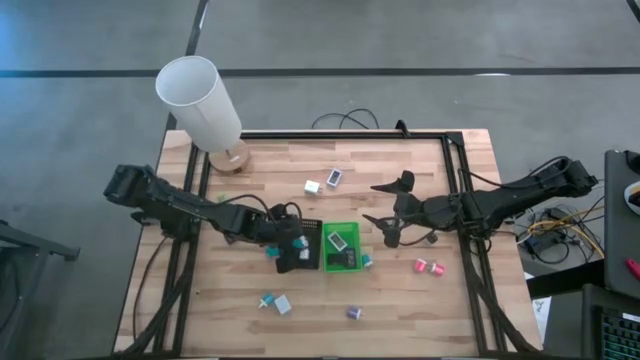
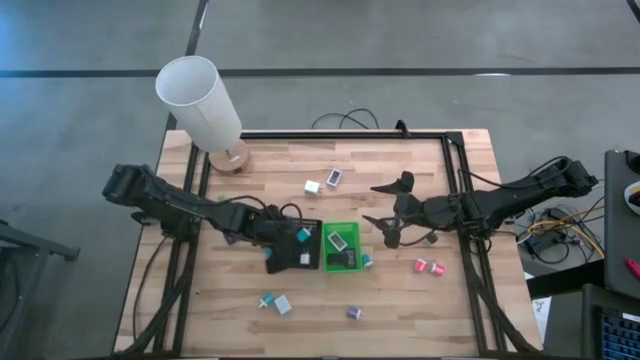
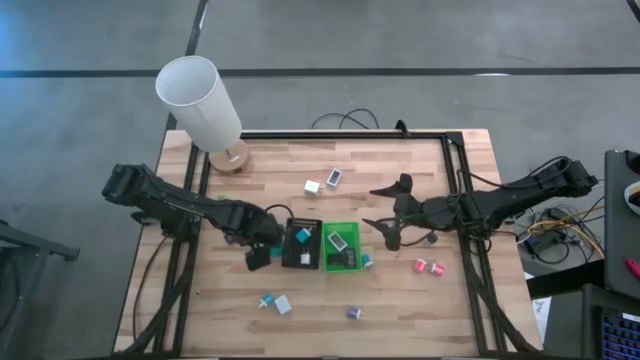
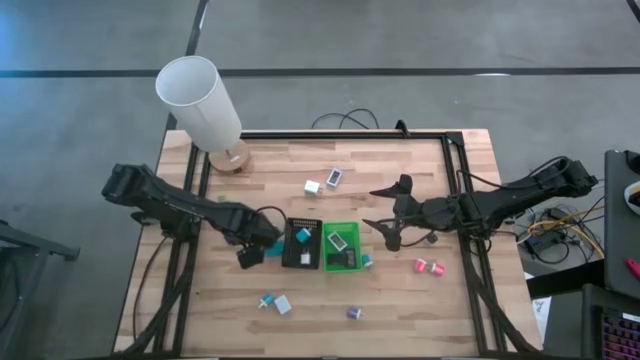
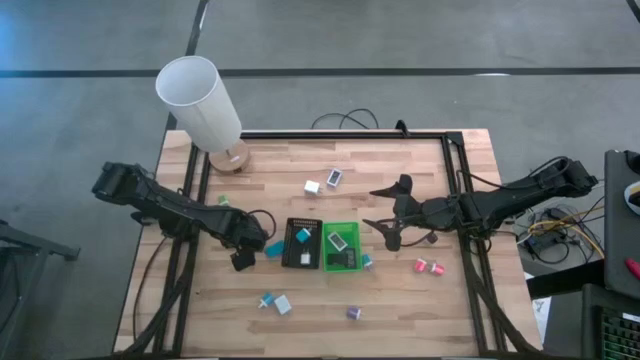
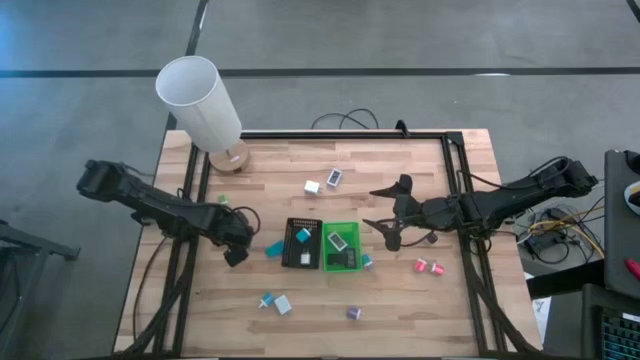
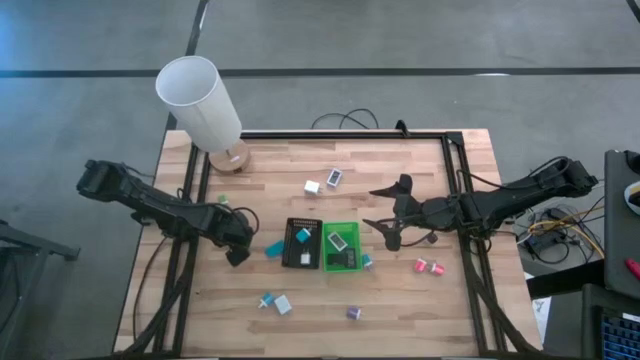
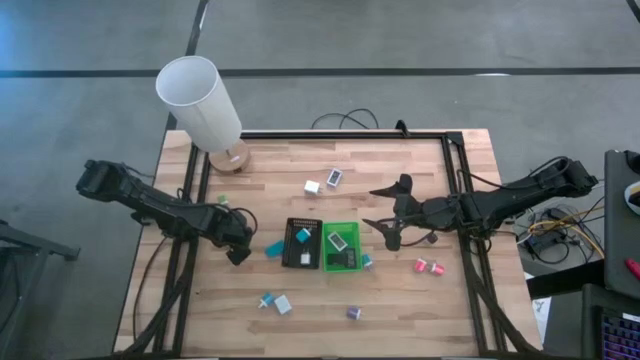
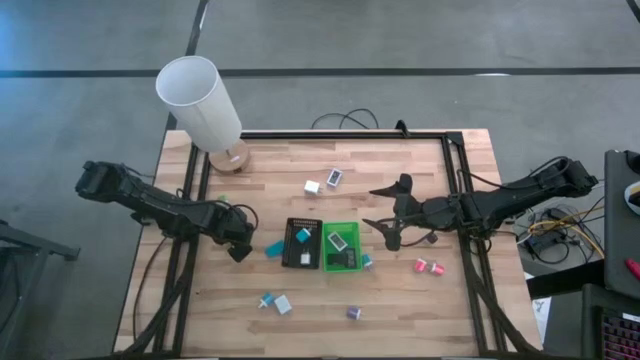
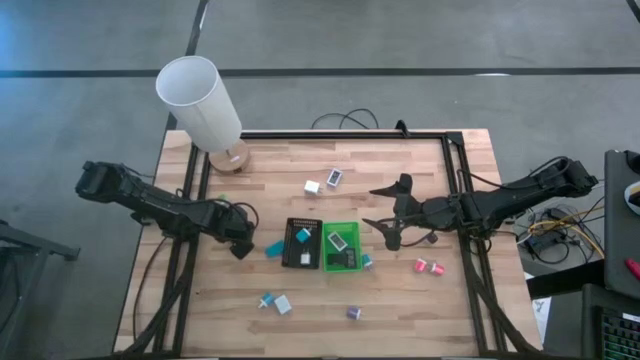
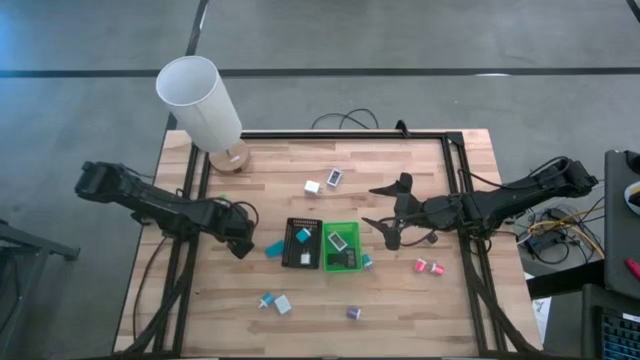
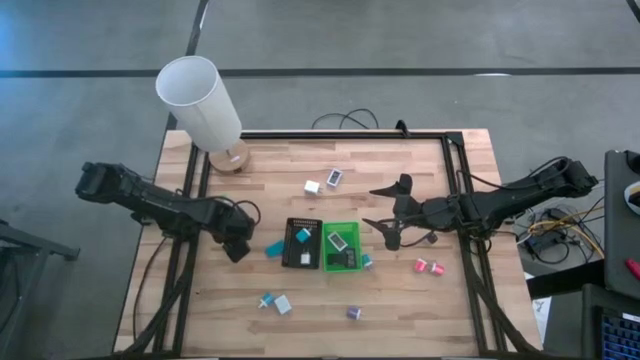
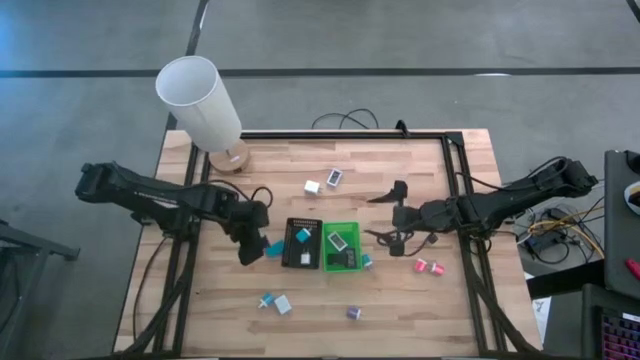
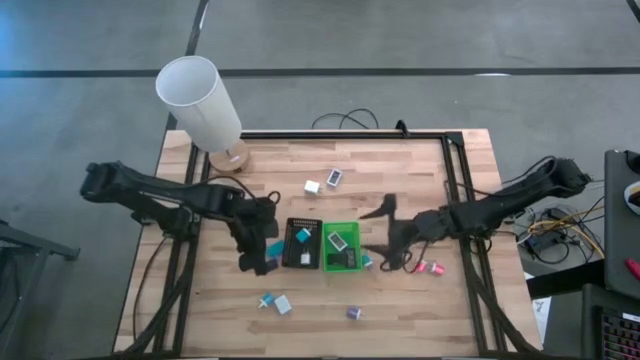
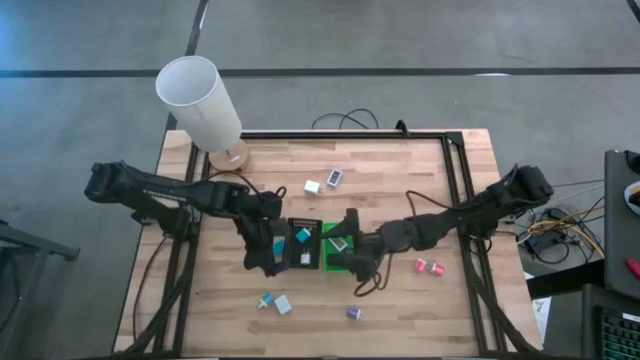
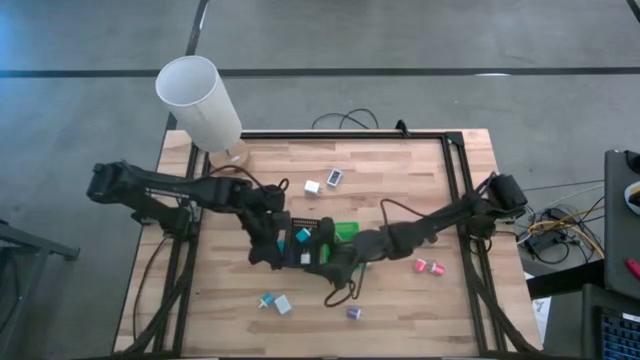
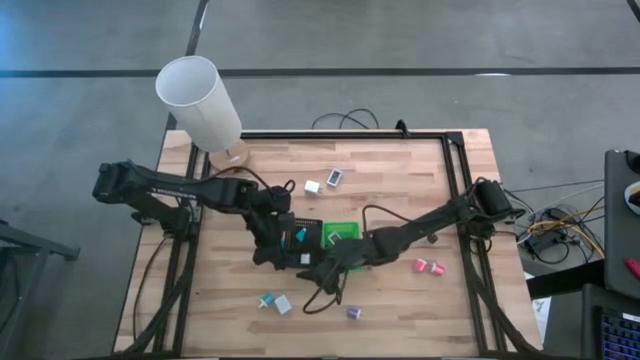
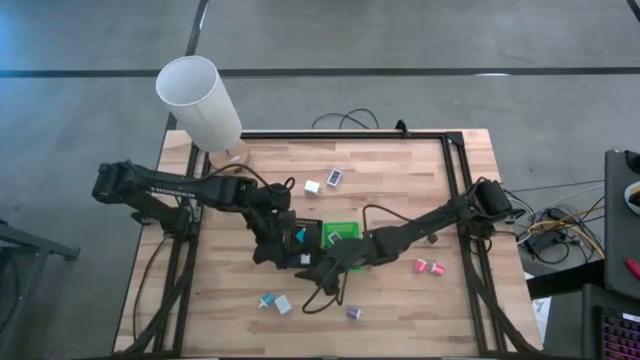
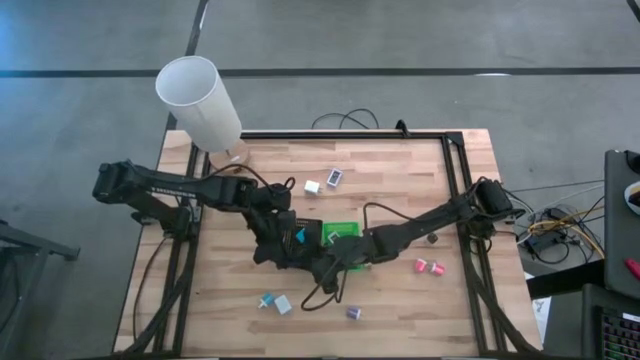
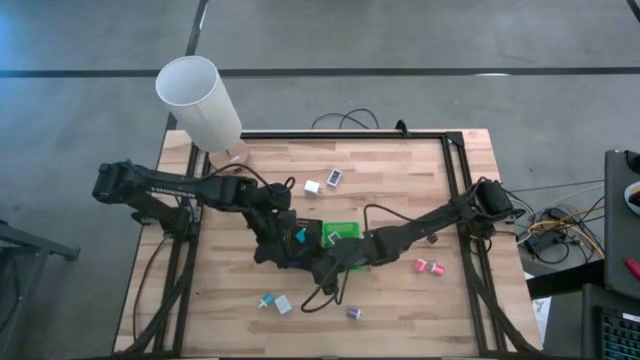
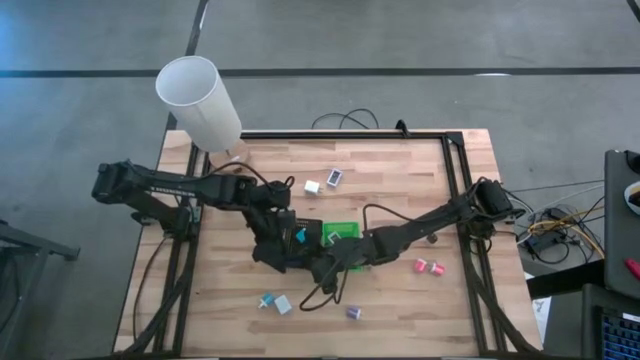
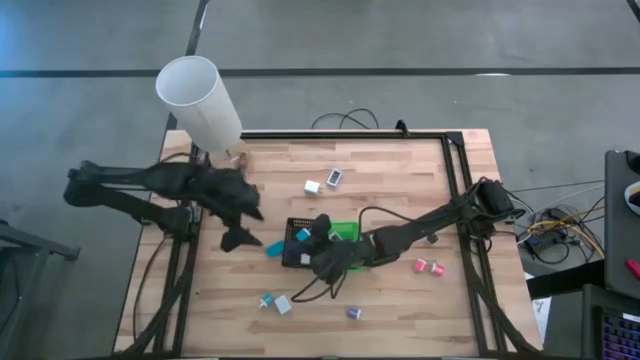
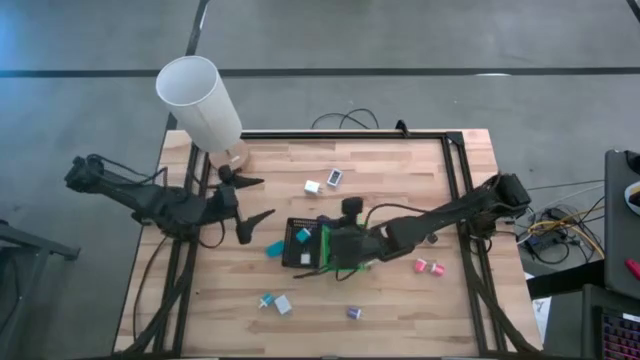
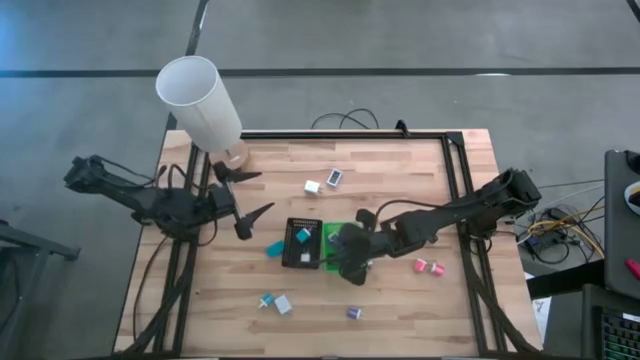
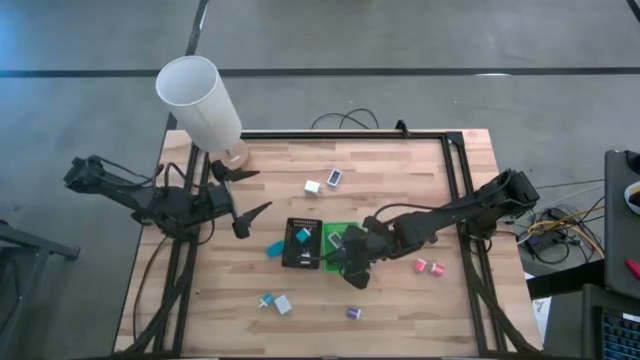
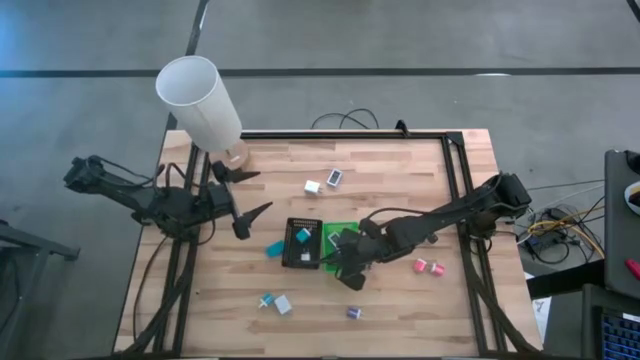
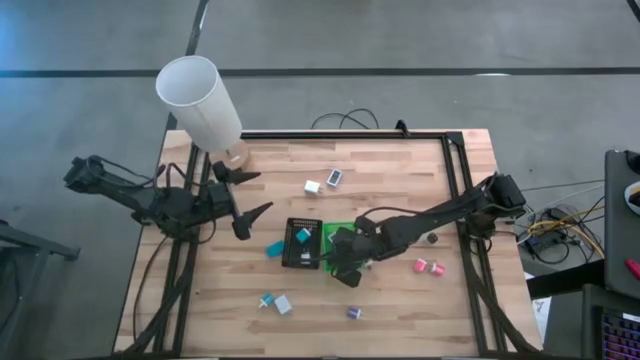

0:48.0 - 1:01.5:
Task: Pick & Place Office items
Put the blue timer into the green bin

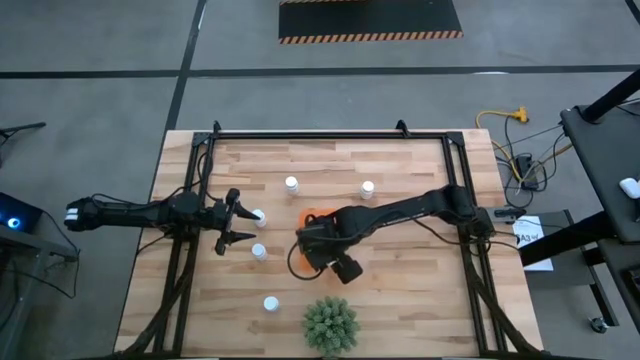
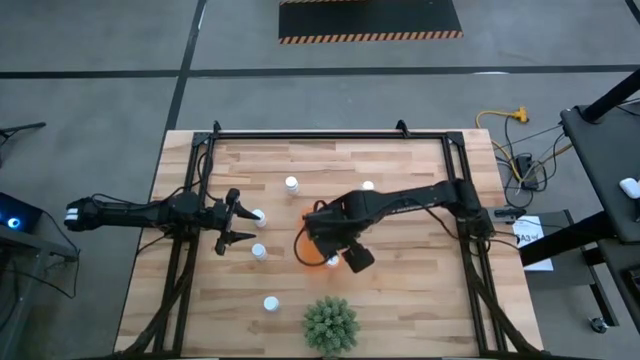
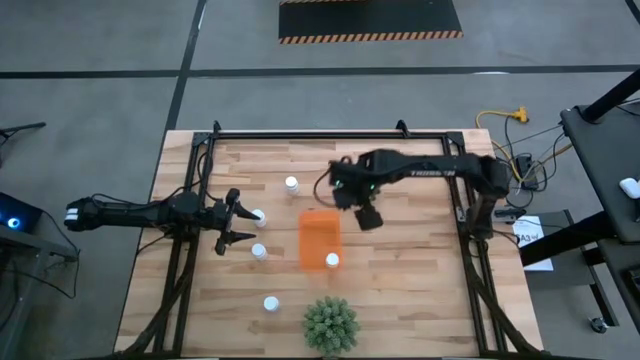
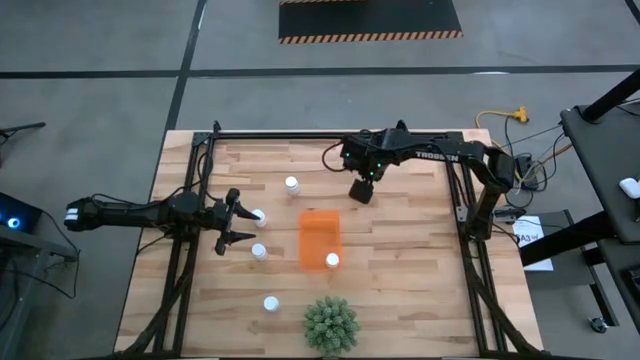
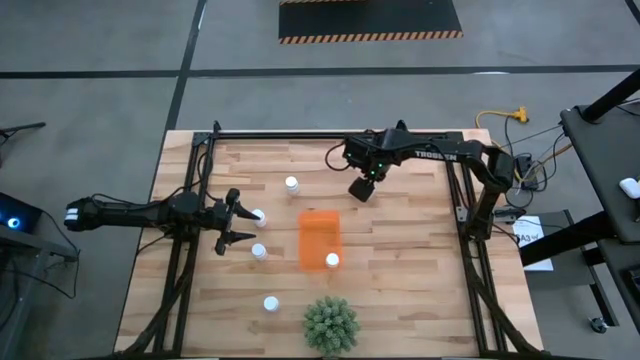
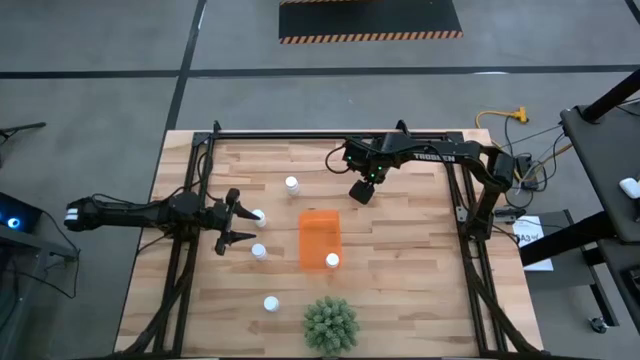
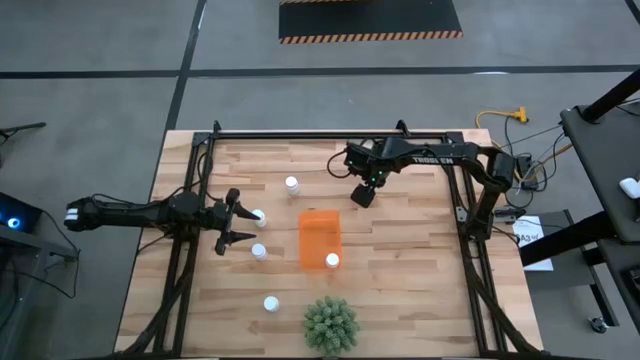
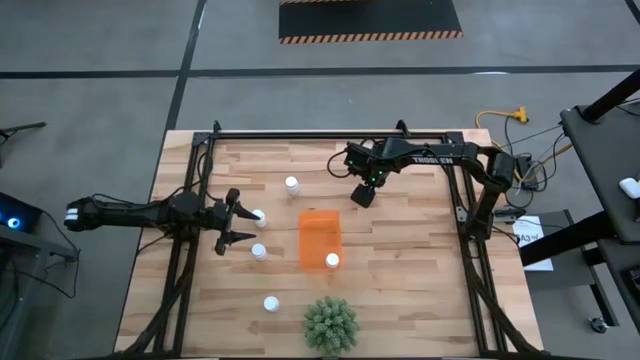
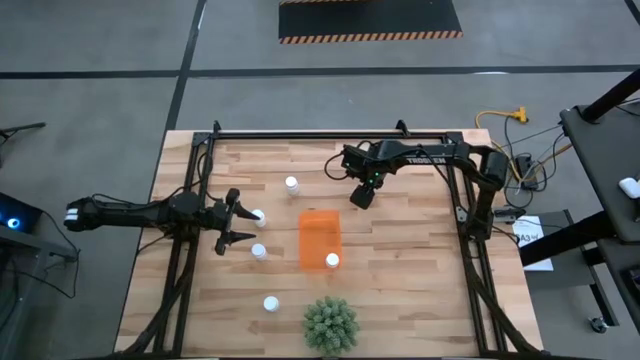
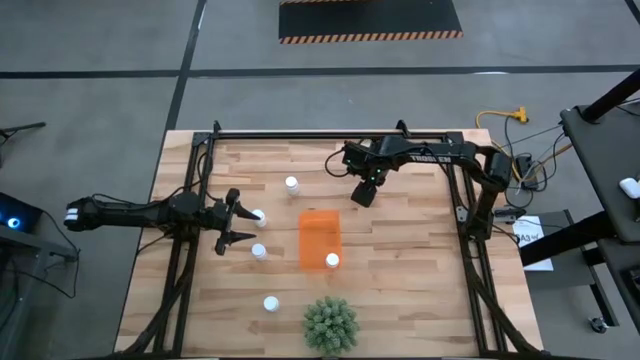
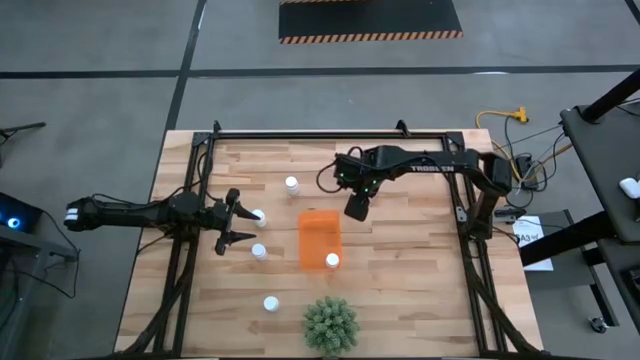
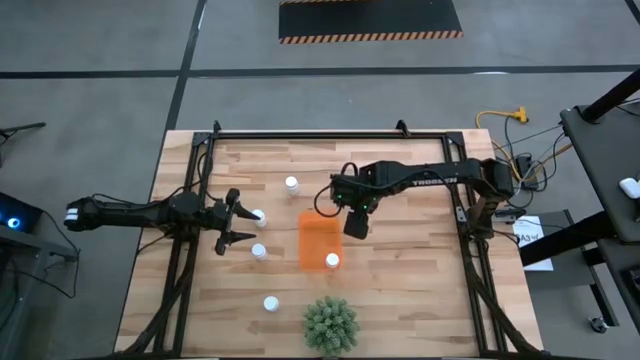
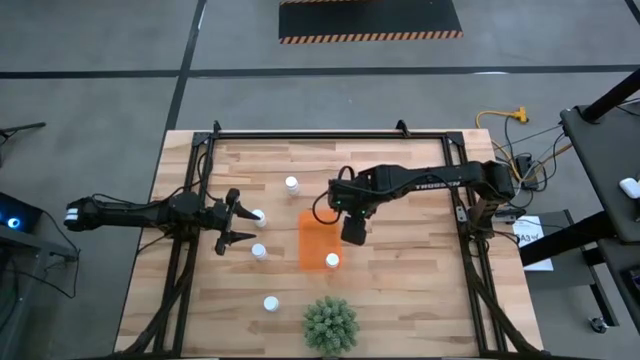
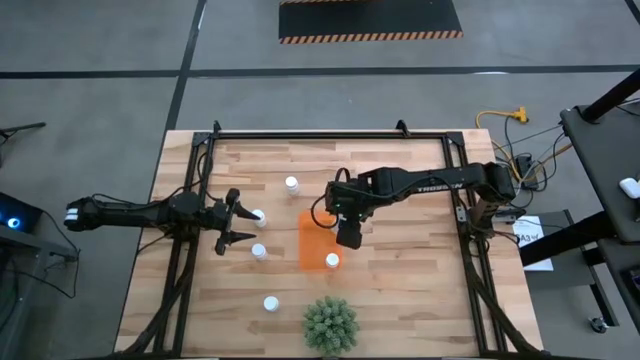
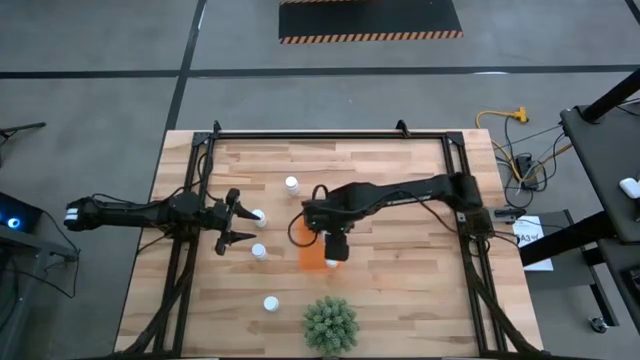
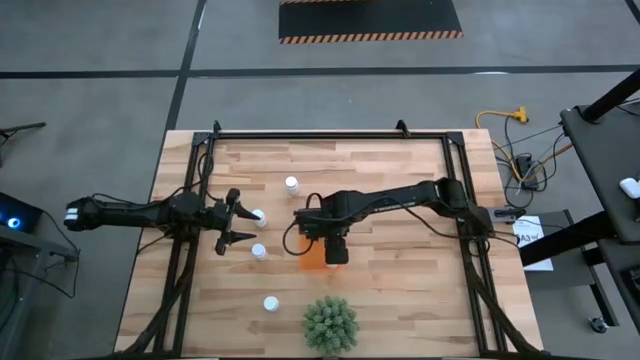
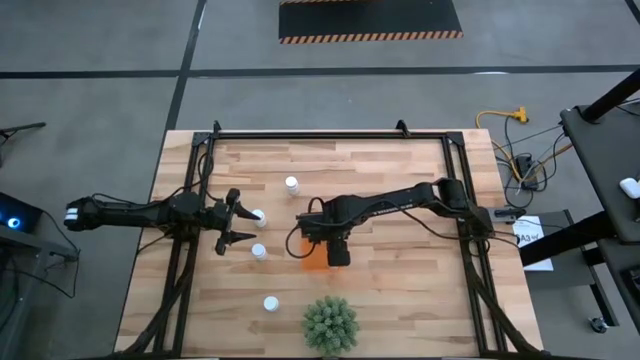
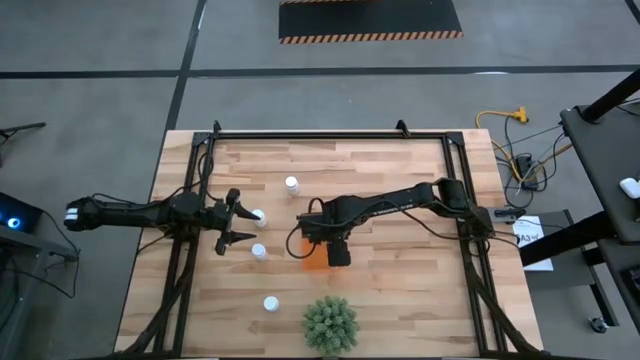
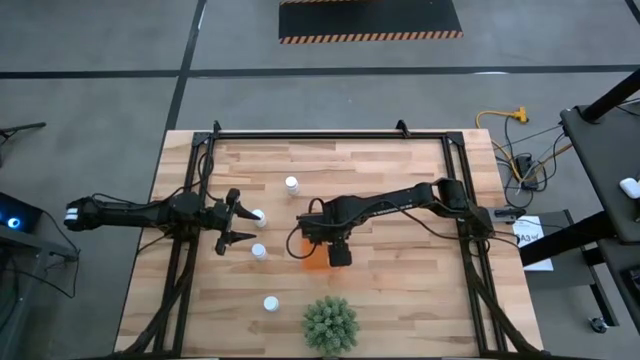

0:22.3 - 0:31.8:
Task: Pick and place pill bottles into a basket
Put the white pill bottle into the orange bin
